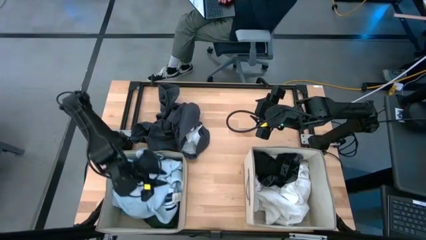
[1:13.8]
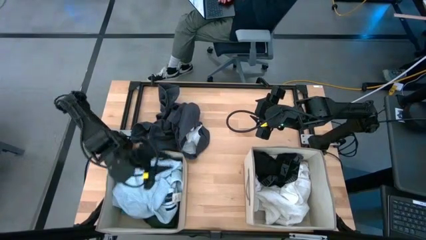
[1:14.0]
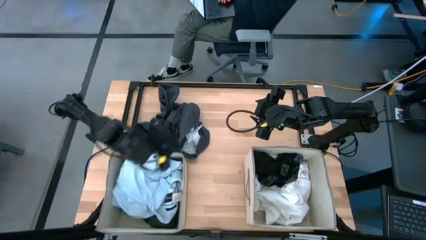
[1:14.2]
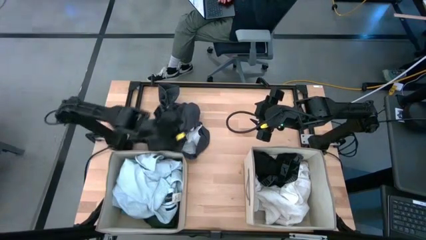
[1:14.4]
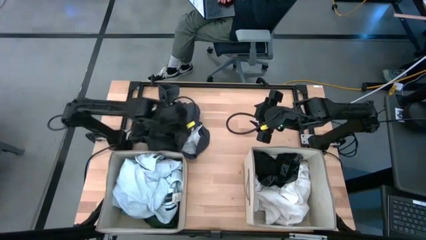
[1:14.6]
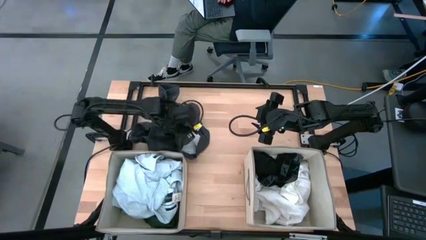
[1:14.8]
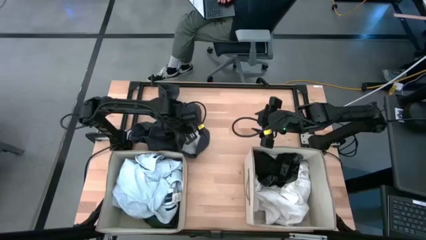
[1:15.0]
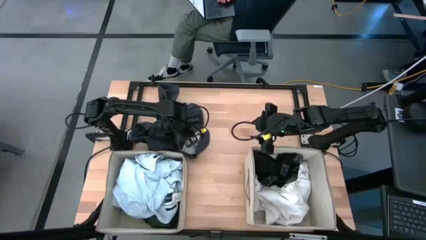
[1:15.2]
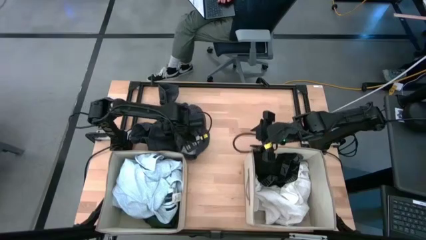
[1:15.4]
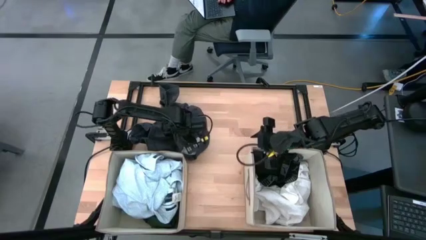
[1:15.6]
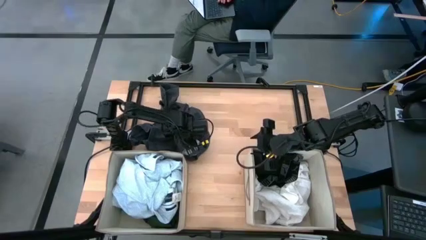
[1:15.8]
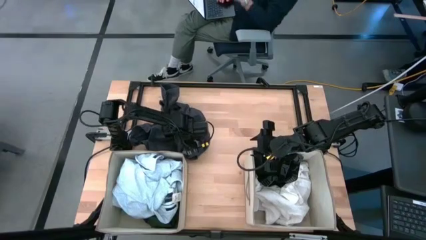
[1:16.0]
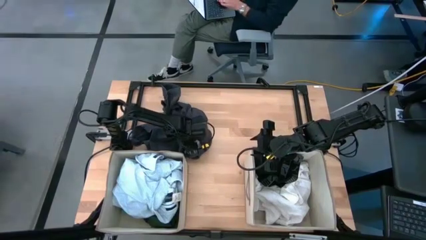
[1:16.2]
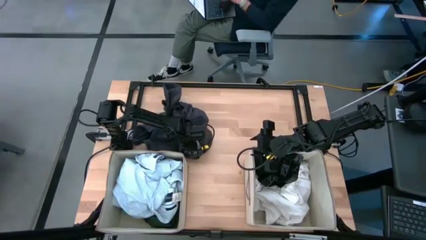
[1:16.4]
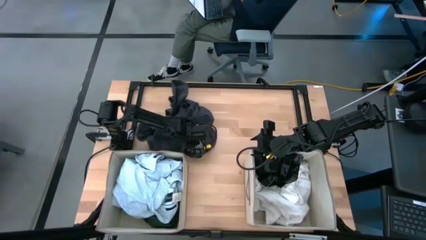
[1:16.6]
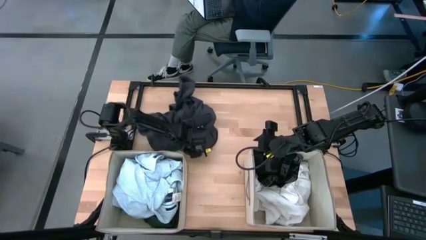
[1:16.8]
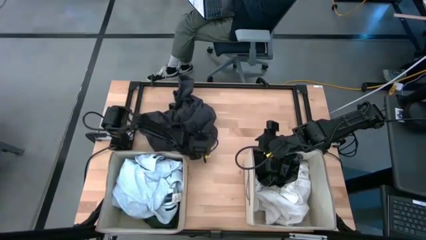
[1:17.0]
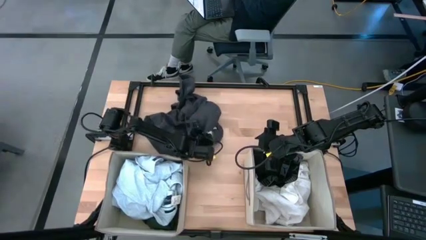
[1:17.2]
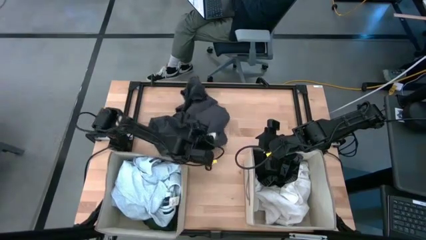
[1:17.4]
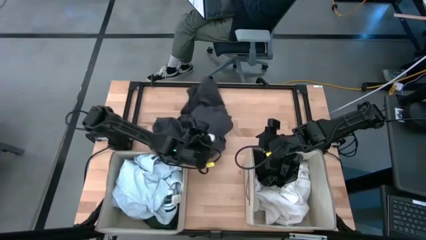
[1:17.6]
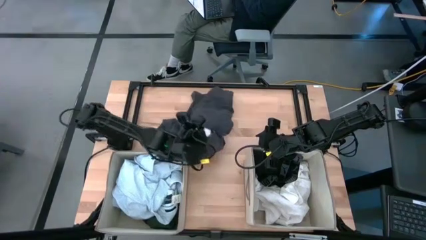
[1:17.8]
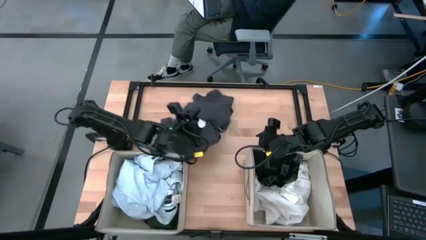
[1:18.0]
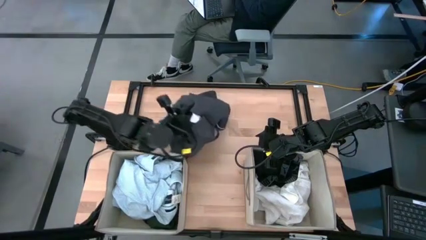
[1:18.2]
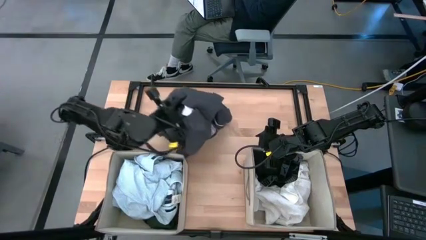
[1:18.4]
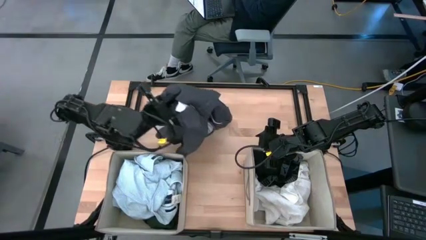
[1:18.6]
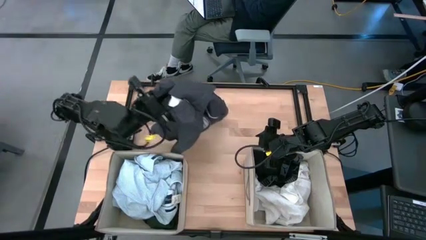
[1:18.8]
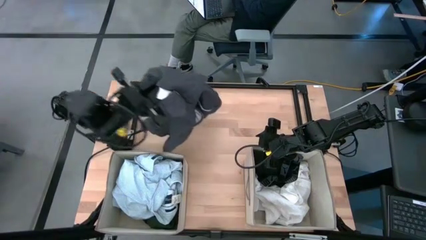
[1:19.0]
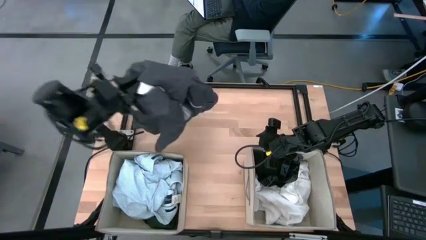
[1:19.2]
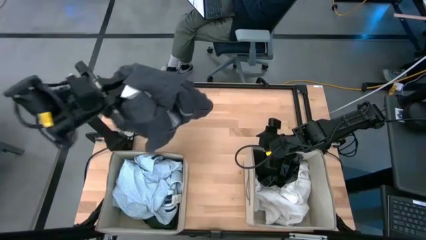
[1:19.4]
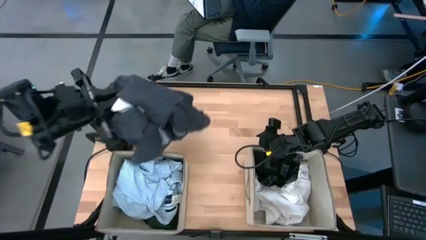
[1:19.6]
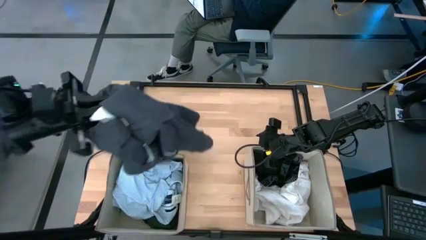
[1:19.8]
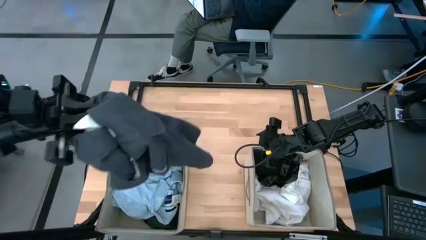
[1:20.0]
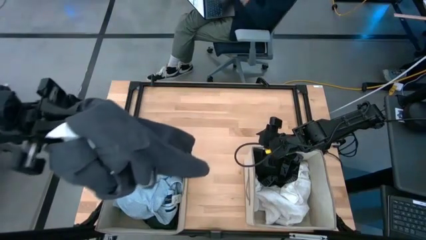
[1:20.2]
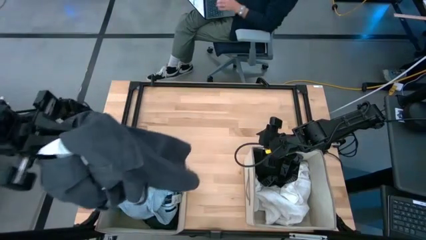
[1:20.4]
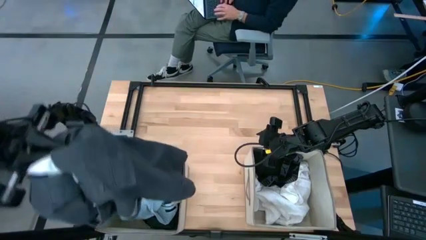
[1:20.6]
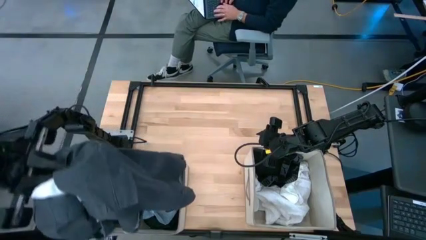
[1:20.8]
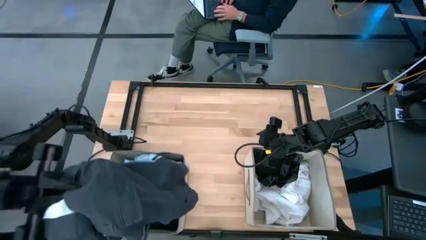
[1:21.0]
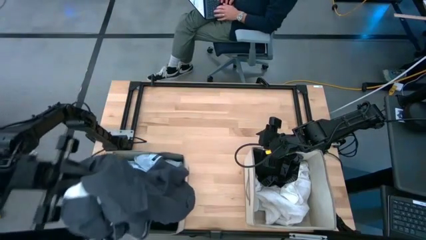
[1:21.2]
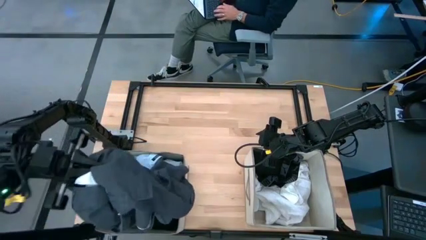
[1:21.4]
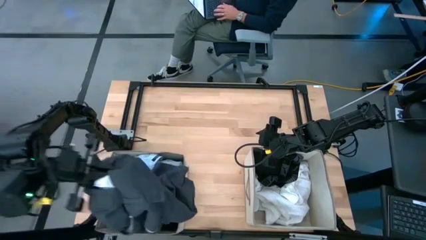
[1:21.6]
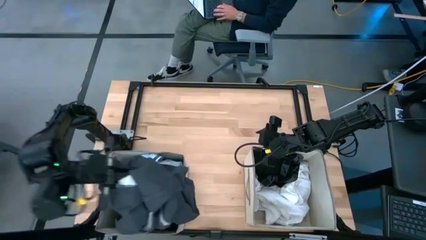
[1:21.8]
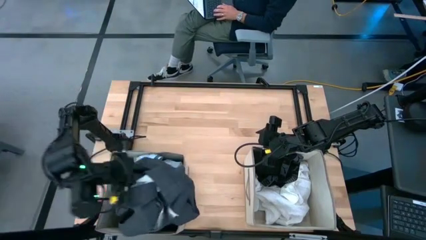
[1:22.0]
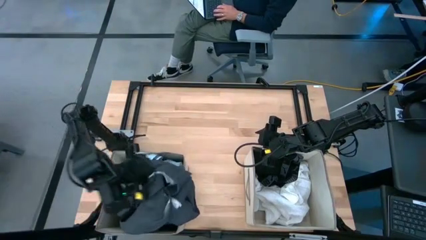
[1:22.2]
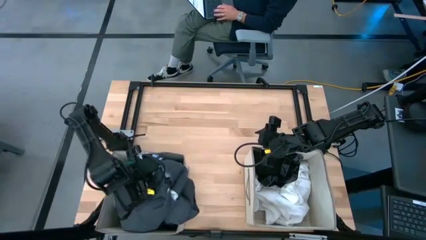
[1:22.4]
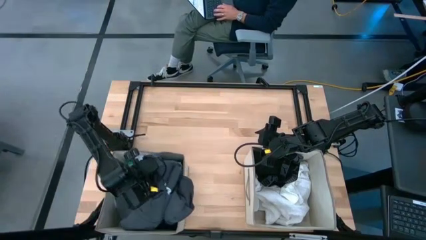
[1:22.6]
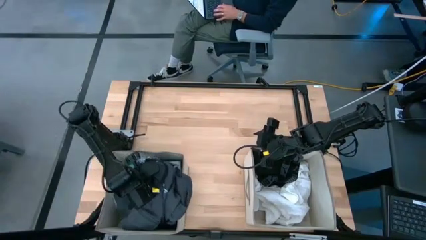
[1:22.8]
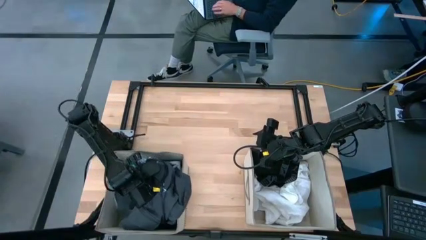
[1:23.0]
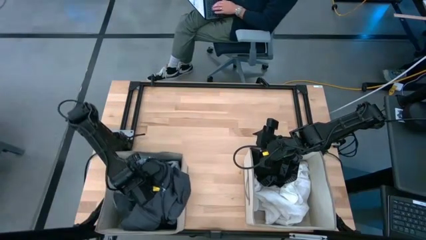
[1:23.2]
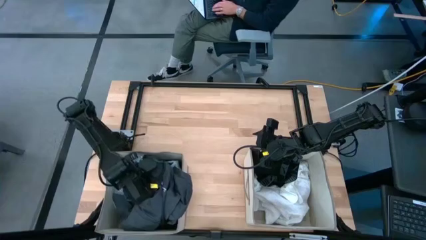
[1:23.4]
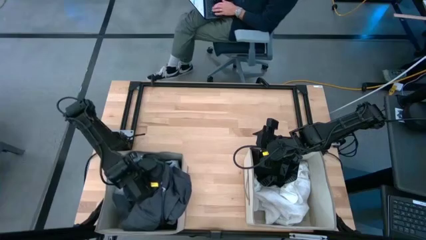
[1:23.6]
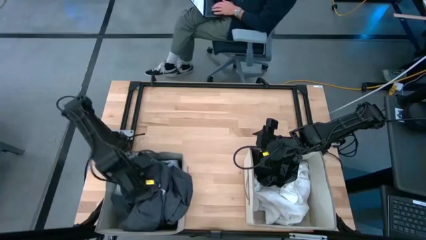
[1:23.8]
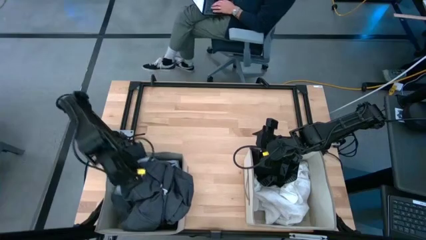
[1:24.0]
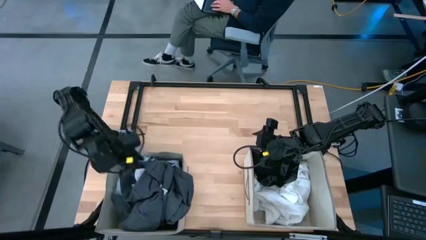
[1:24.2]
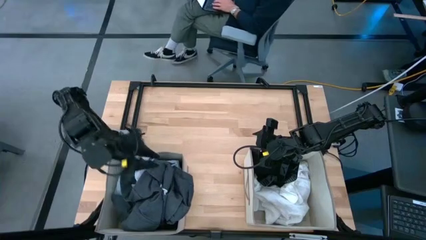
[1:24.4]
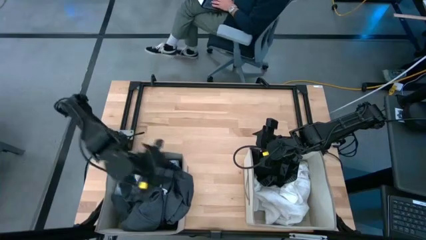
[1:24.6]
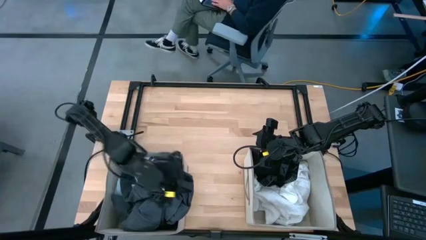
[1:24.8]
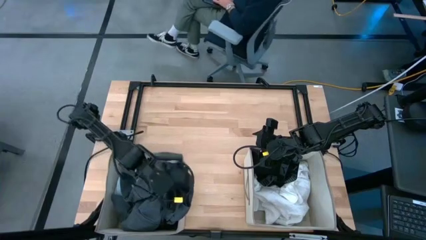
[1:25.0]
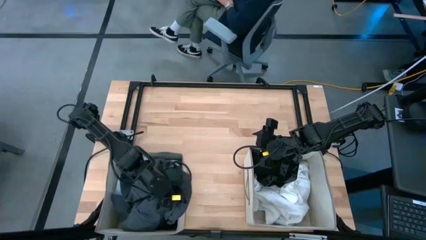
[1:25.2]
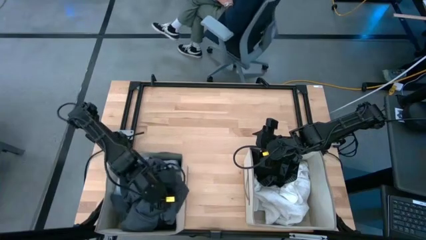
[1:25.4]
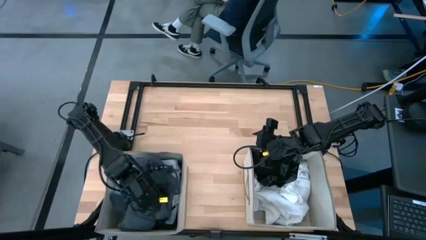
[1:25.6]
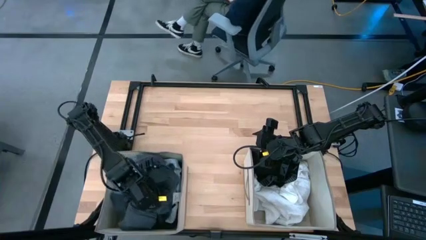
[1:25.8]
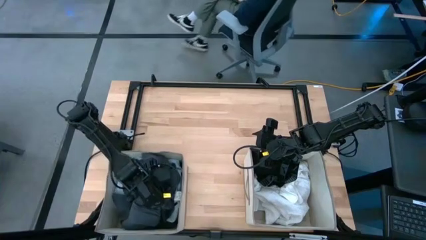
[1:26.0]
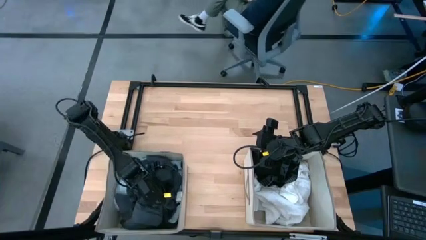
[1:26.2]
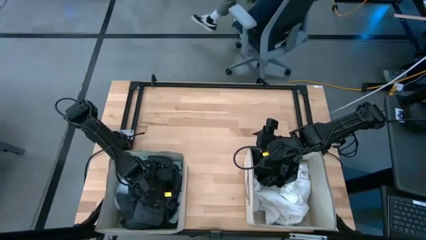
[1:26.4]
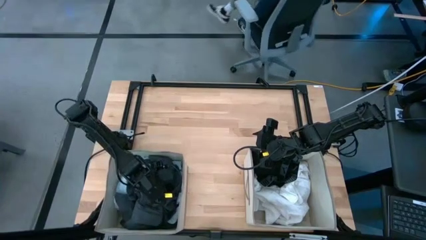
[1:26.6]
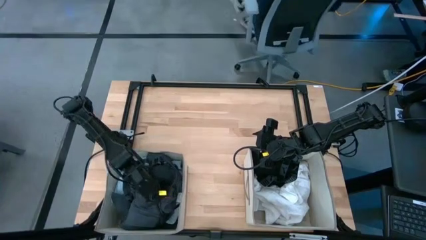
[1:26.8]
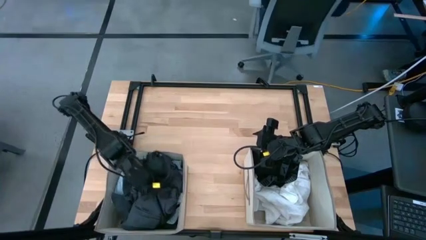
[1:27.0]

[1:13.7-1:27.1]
Task: Sort clothes
Put the gray shorts into the left brown laundry organizer

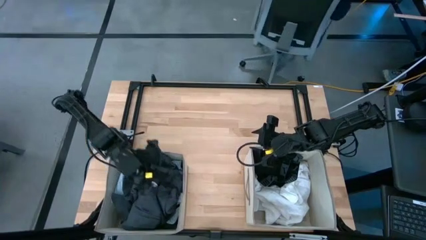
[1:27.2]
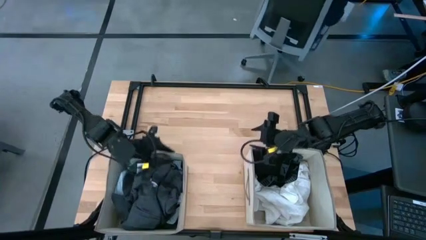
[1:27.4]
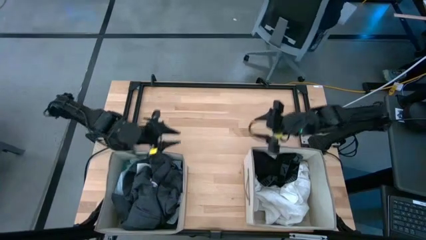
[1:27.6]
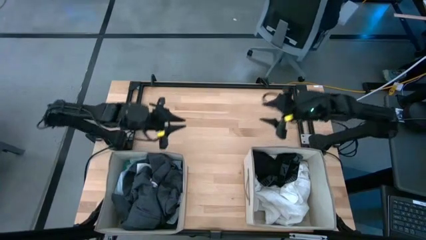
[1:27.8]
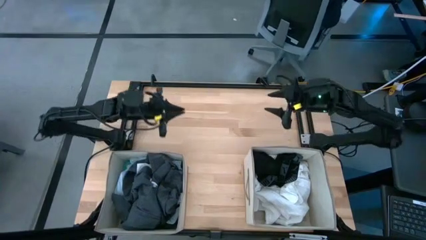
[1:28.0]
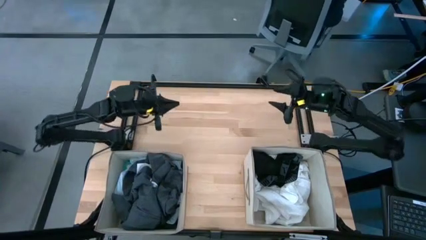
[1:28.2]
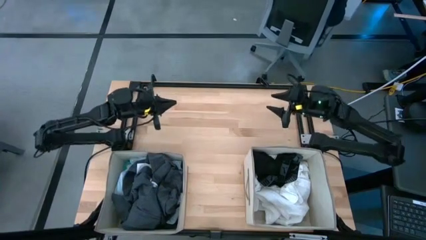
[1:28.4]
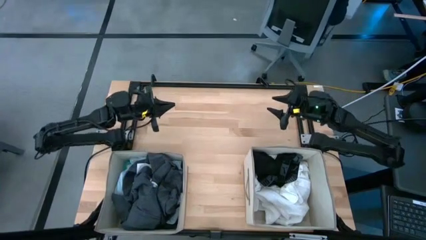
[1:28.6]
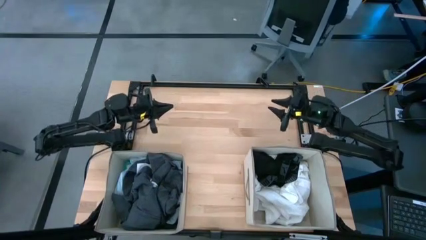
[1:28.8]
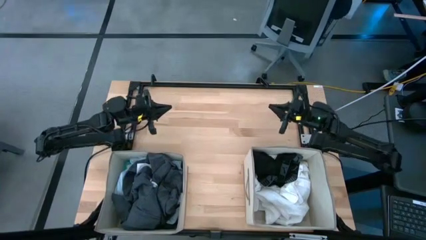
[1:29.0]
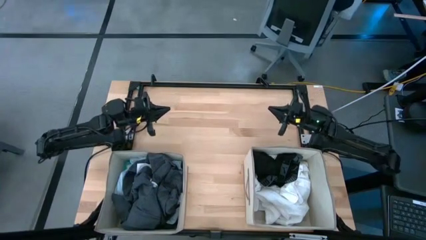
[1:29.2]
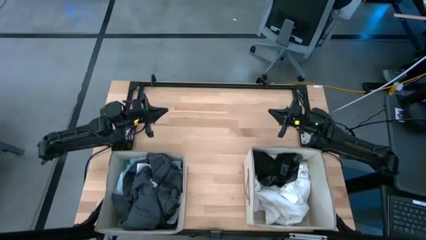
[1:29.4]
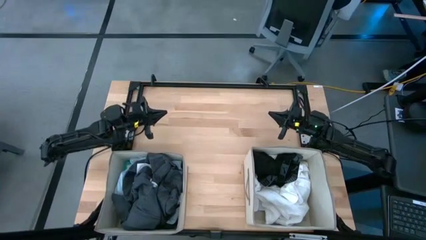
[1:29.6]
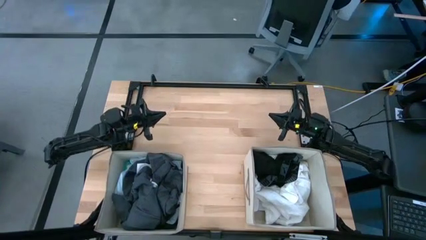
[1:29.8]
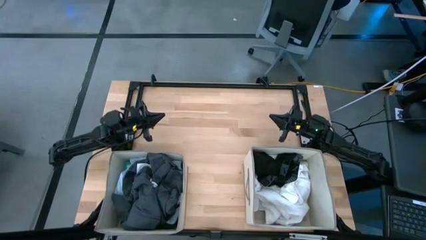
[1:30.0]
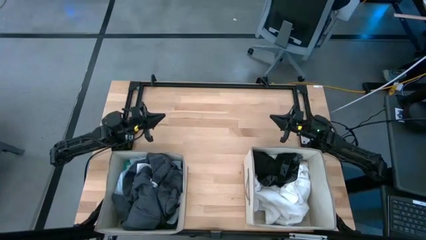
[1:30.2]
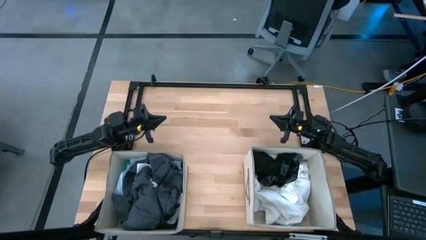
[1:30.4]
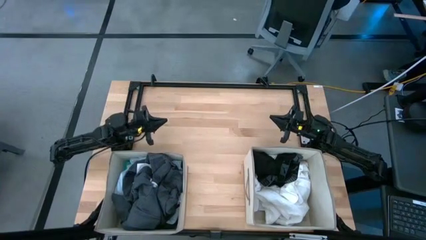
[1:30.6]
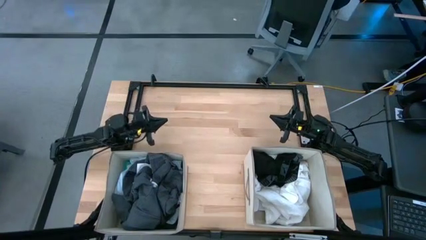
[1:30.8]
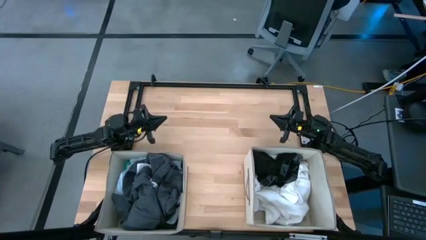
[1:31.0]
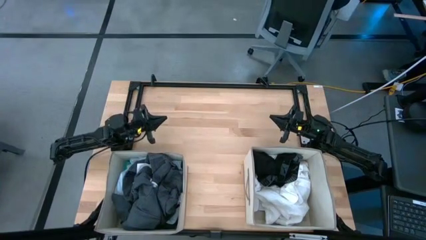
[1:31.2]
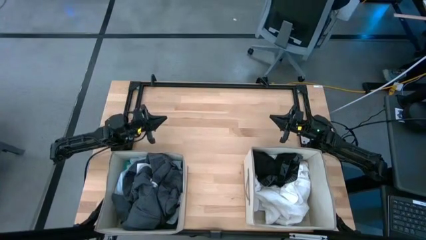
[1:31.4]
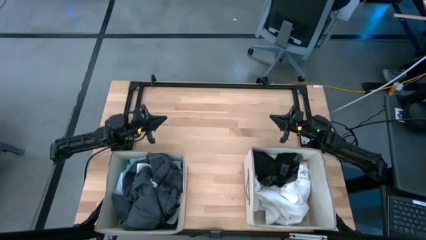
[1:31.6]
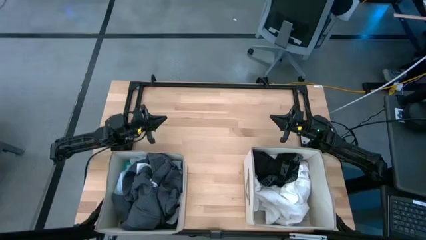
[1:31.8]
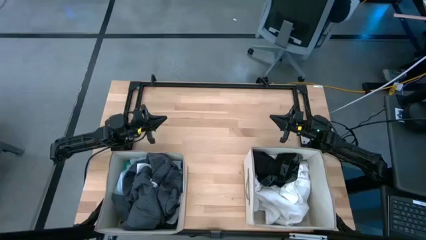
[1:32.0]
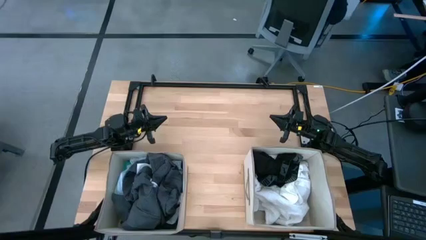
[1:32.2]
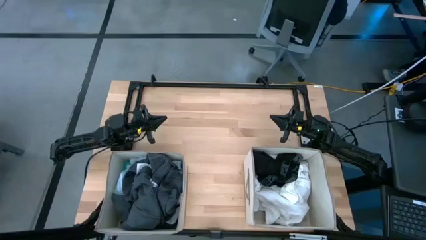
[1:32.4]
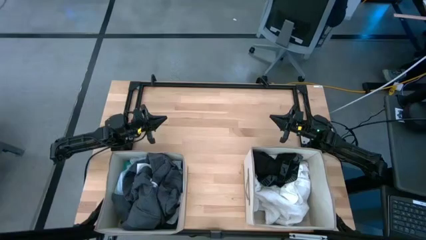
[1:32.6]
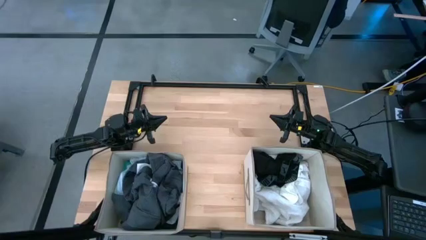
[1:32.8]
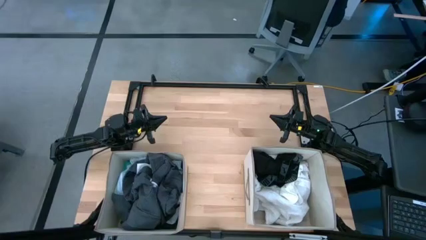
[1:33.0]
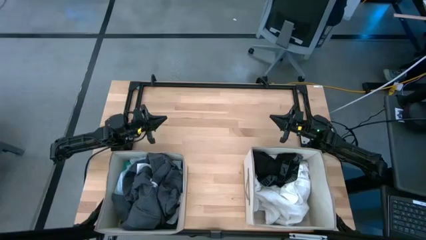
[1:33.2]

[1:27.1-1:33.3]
Return to Home Position
